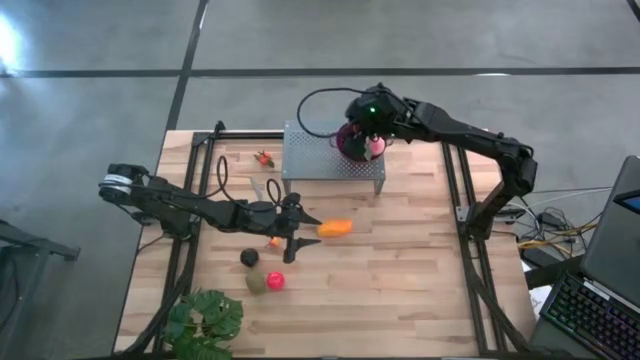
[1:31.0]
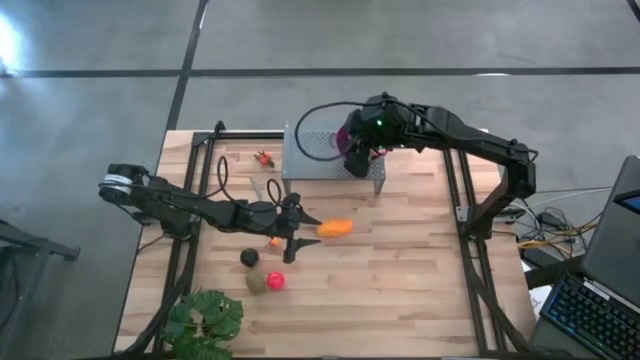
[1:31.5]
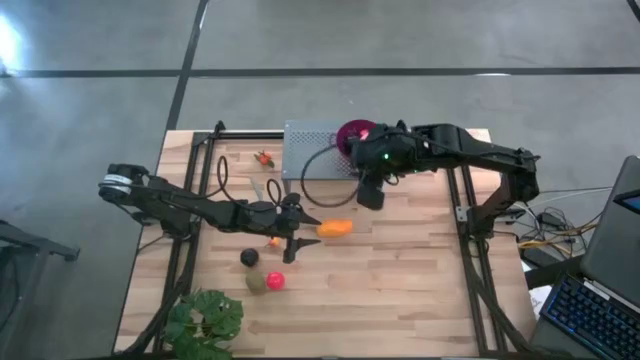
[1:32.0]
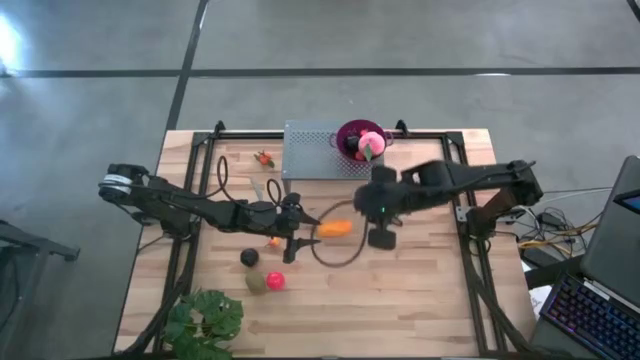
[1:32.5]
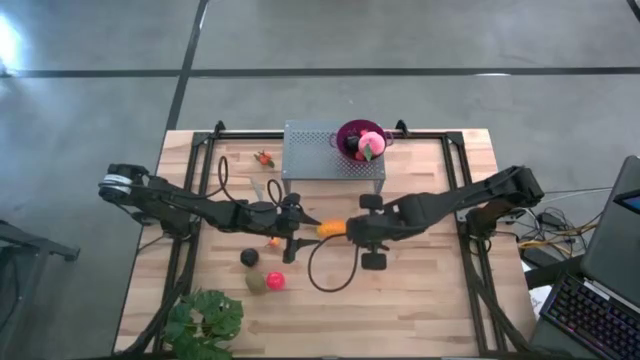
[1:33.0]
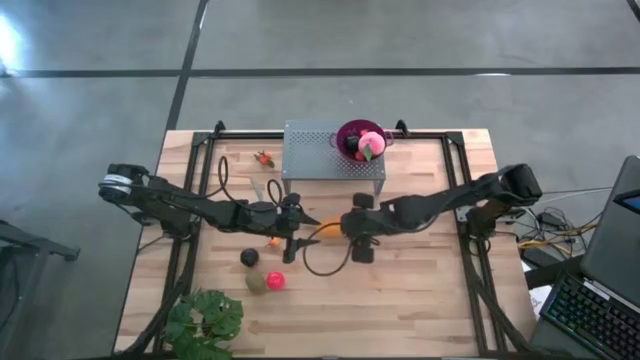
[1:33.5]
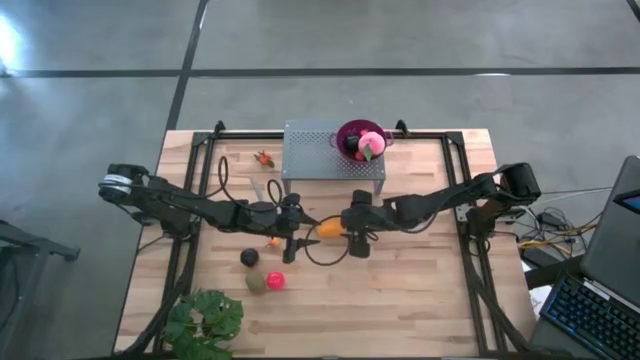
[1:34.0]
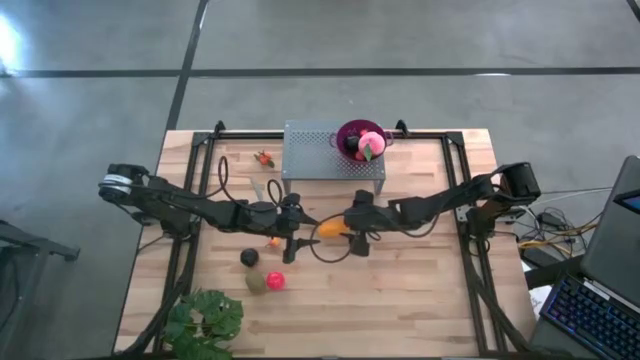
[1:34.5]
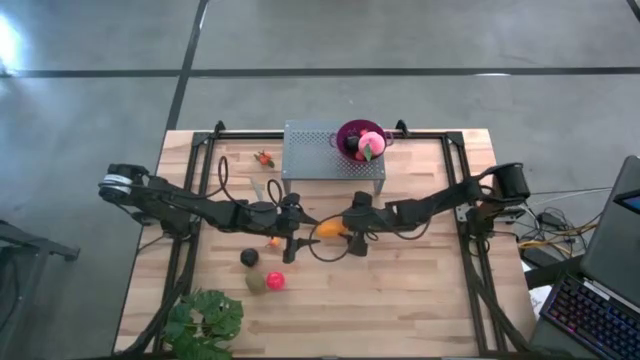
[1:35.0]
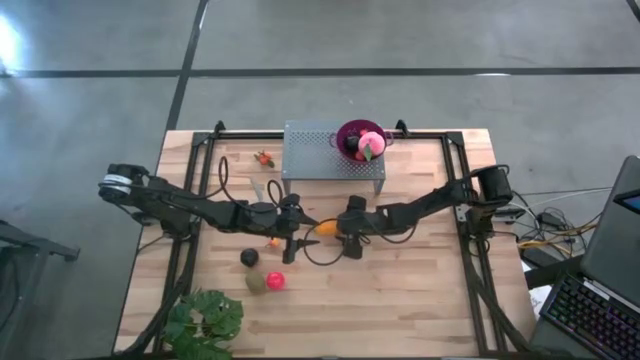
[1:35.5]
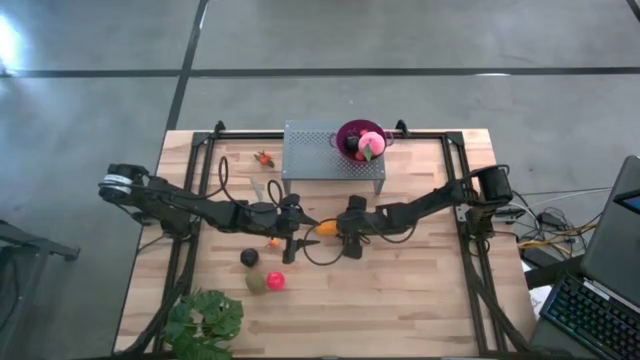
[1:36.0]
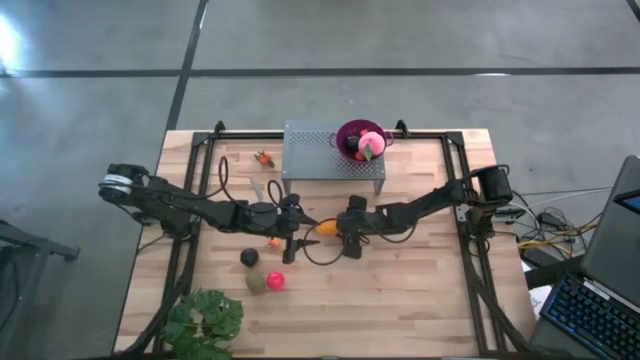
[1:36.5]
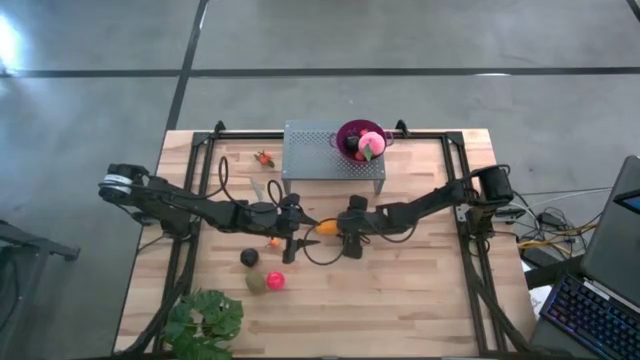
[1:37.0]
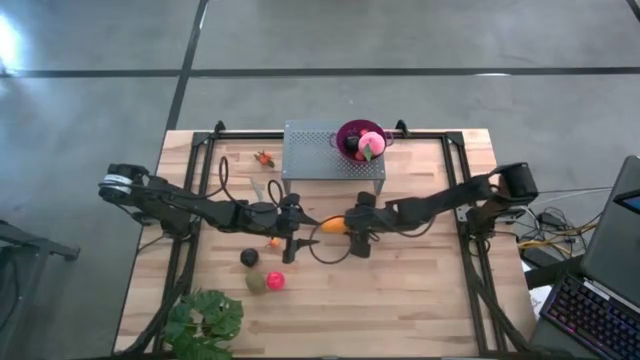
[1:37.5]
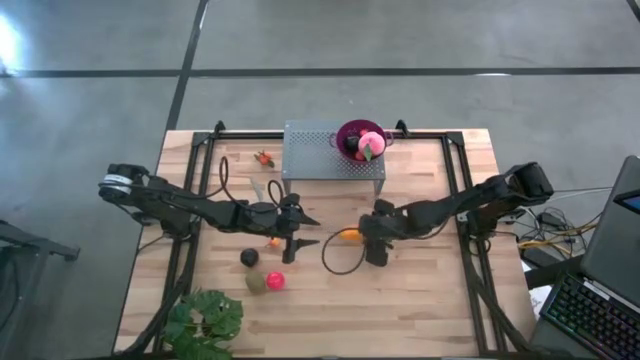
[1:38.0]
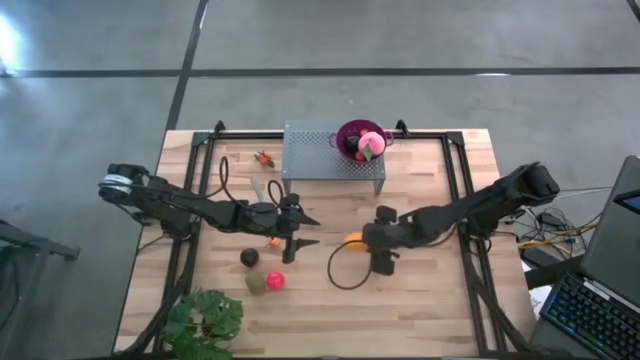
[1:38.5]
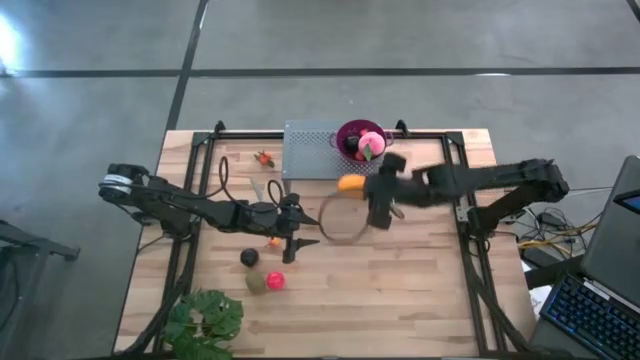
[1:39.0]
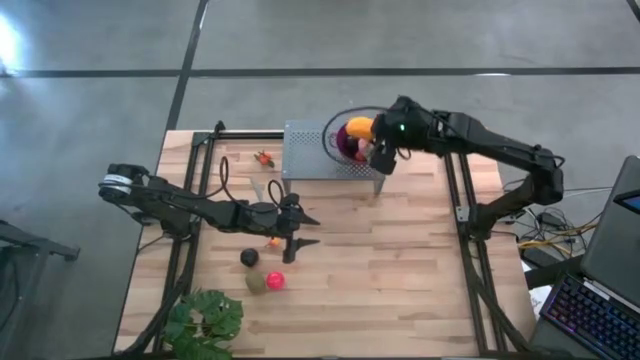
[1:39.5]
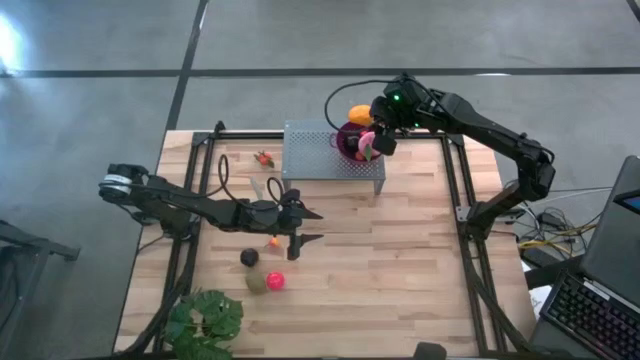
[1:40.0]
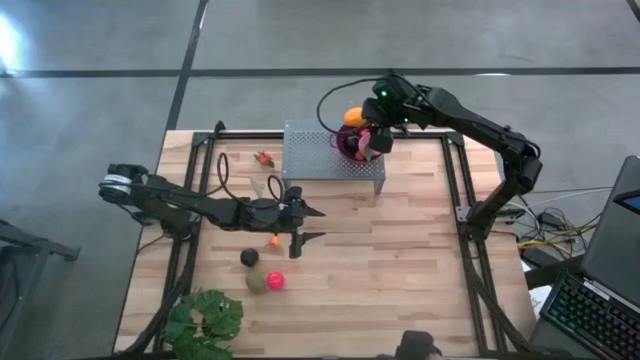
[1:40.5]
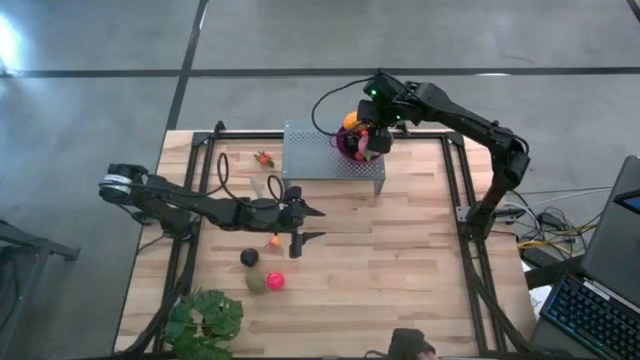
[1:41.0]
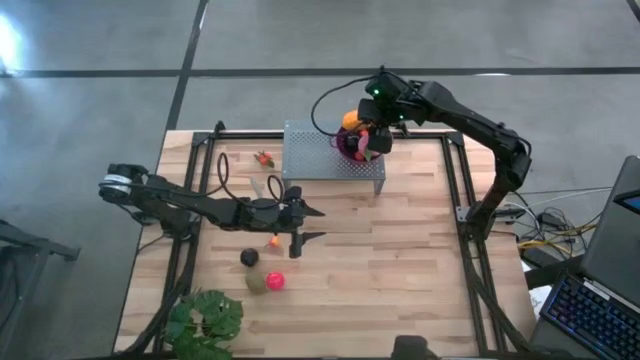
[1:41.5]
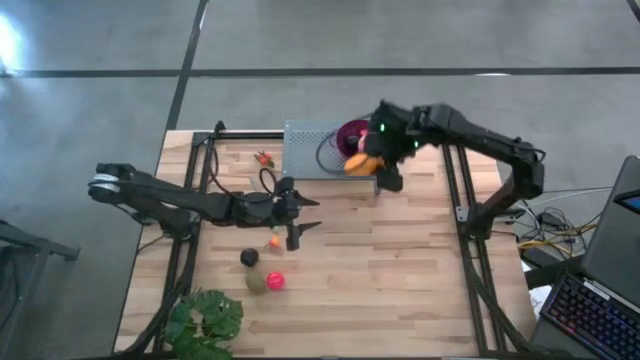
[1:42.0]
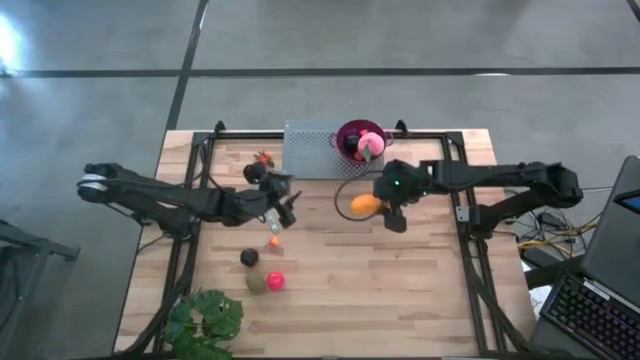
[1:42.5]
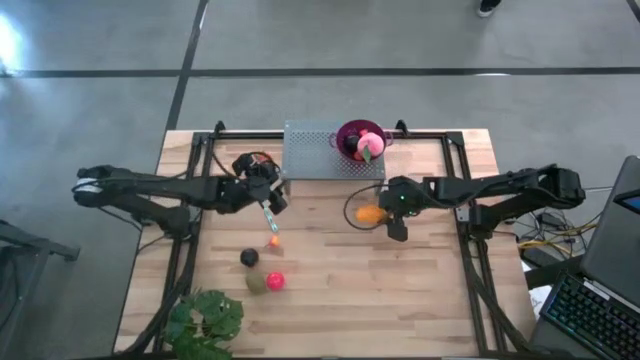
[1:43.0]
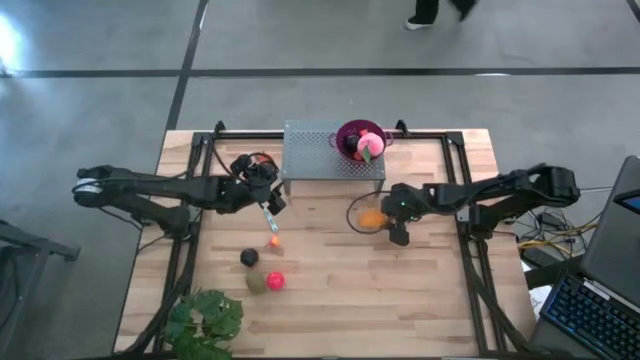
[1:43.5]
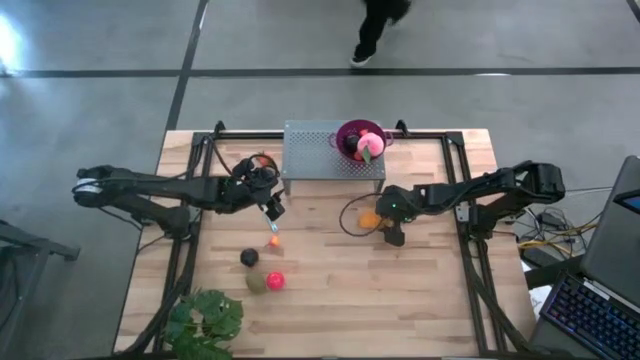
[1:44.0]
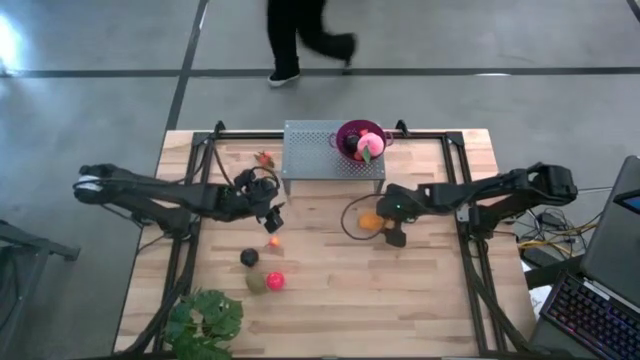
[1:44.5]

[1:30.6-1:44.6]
Task: Pick & Place Fruit
Put the mango into the purple bowl on the shelf

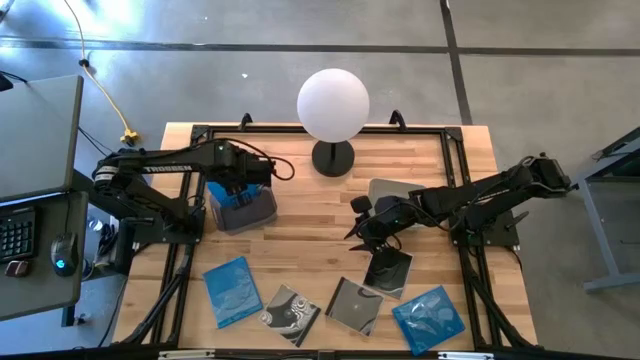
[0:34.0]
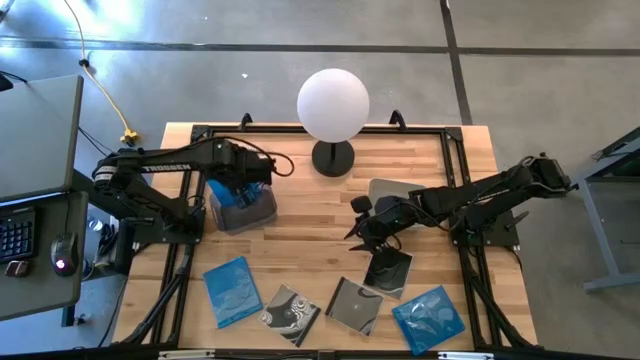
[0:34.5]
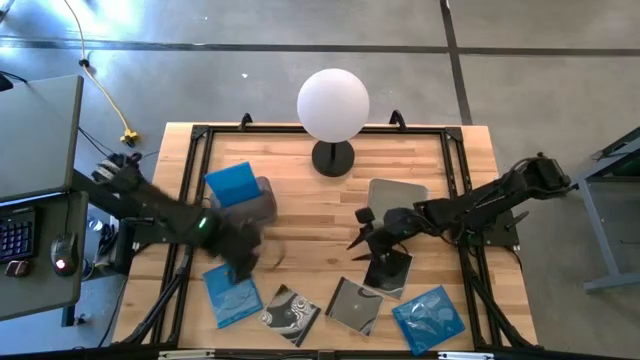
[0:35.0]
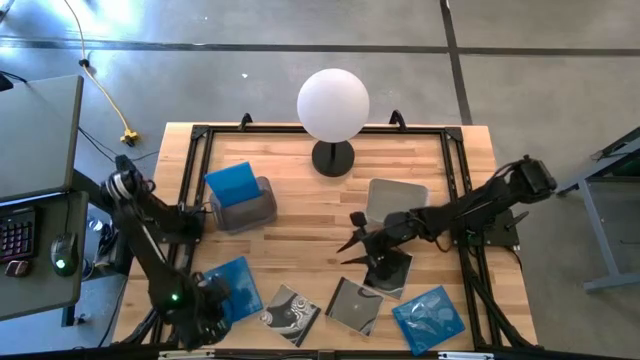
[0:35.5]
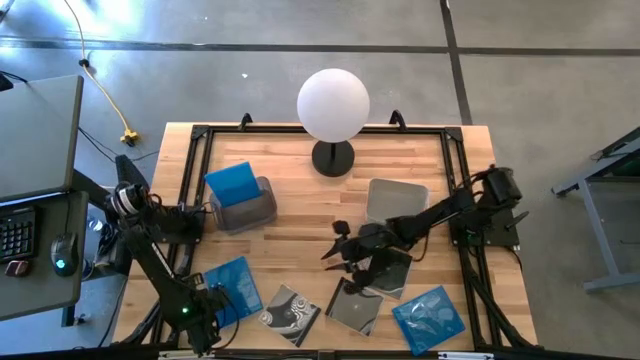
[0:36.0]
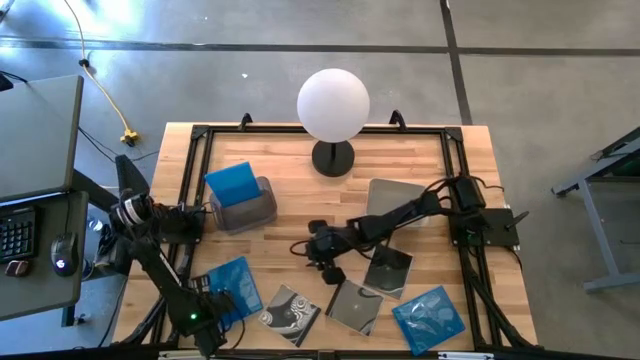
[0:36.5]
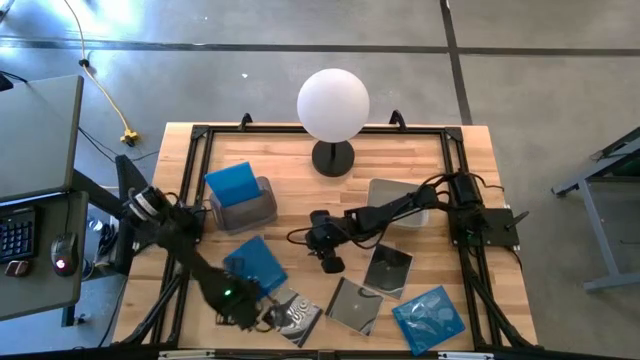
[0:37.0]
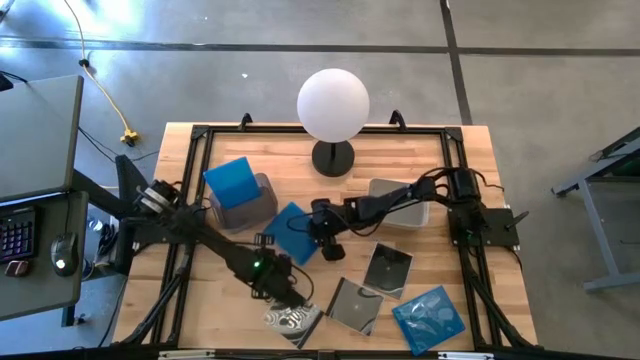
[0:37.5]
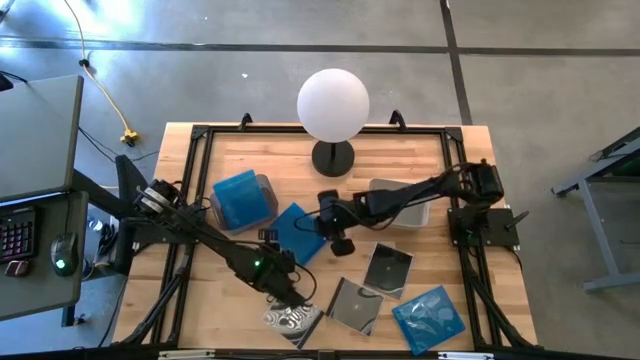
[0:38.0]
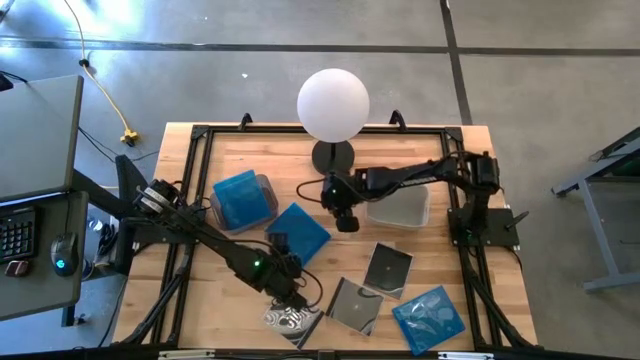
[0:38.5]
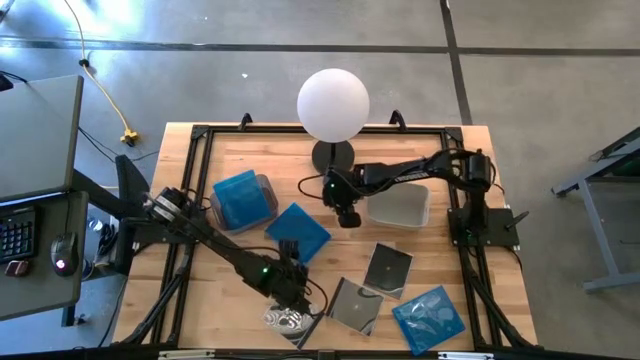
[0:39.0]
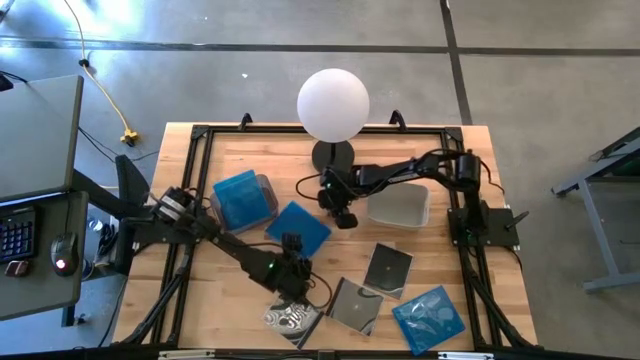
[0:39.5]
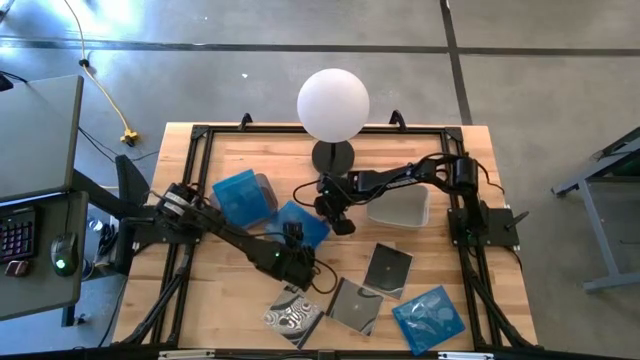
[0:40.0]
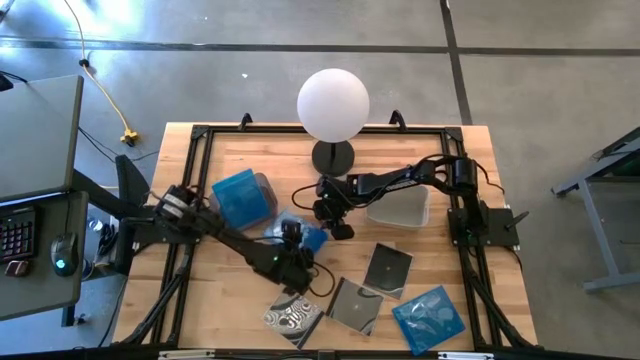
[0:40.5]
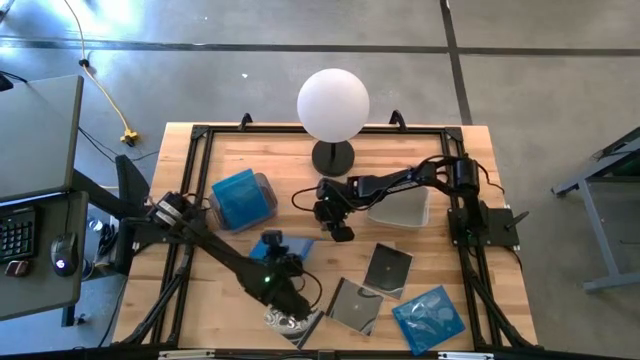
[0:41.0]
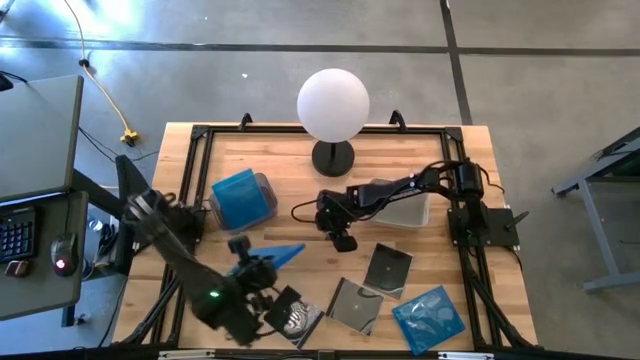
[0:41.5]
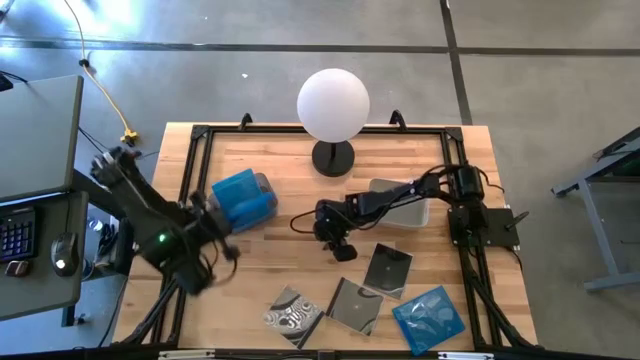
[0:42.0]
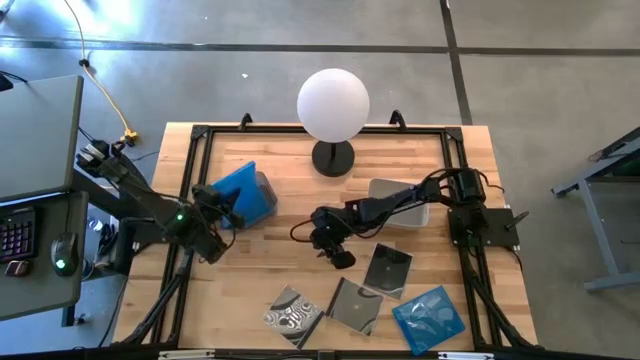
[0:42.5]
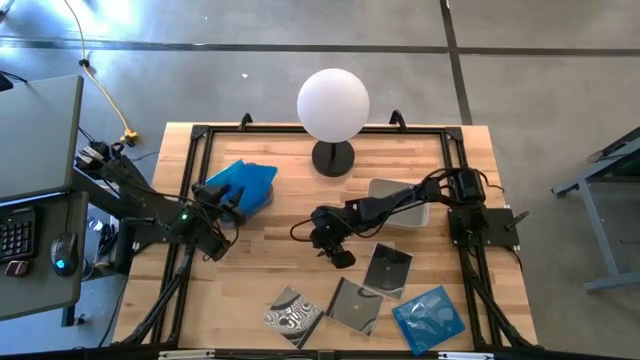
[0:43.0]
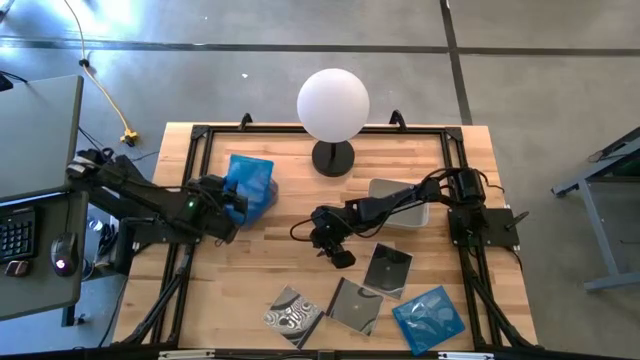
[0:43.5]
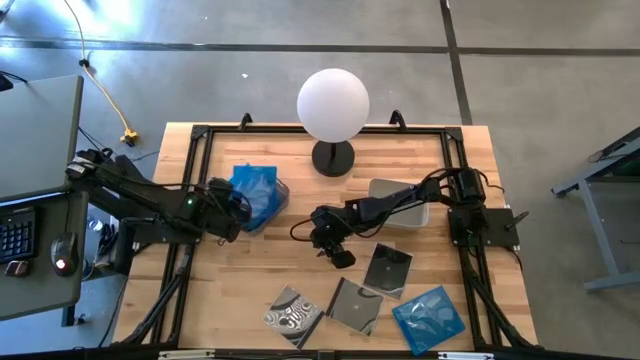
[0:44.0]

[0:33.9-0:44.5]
Task: Pick & place jewel cases by type
Put the left blue cd case into the black bin
